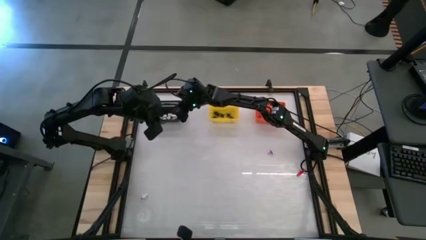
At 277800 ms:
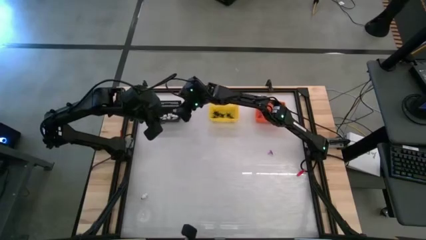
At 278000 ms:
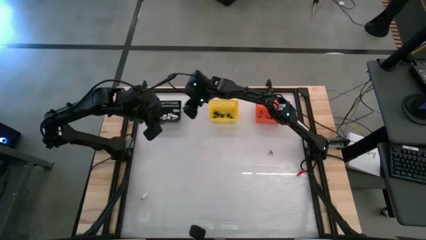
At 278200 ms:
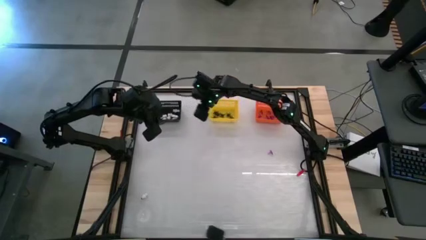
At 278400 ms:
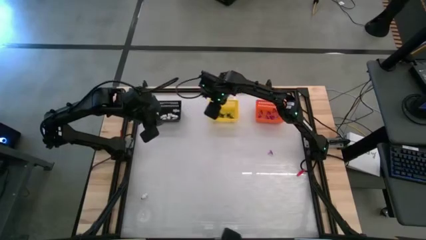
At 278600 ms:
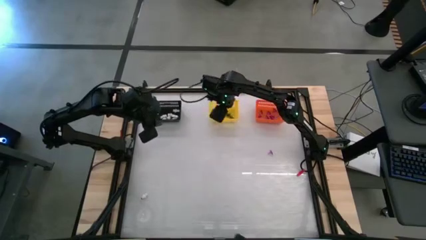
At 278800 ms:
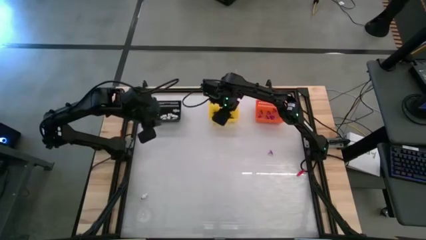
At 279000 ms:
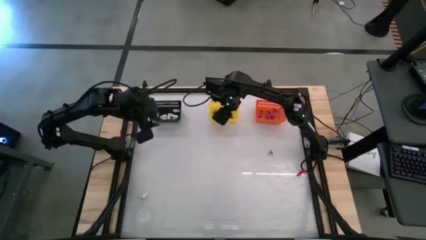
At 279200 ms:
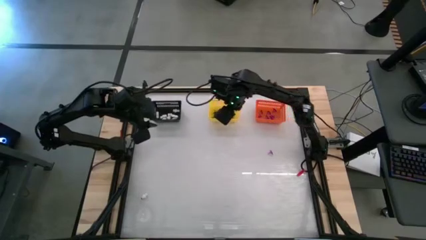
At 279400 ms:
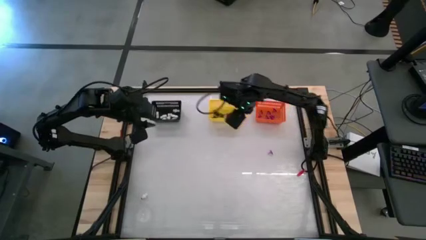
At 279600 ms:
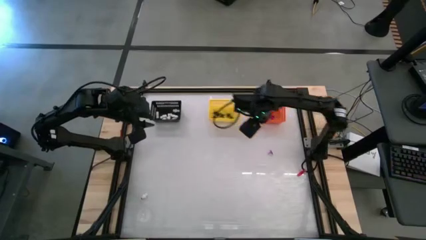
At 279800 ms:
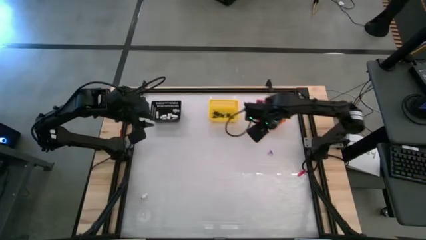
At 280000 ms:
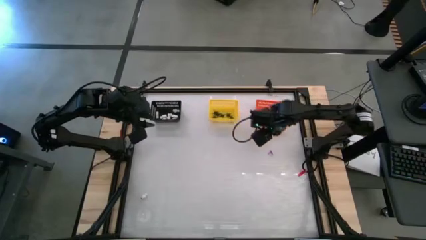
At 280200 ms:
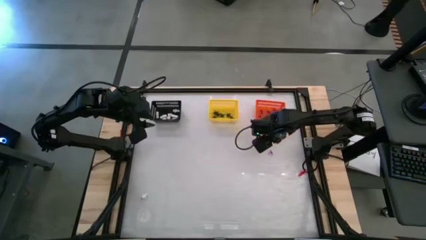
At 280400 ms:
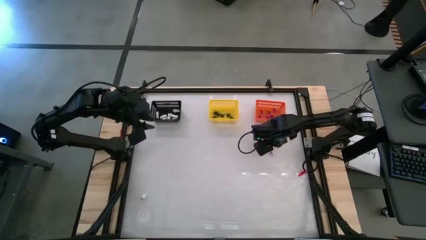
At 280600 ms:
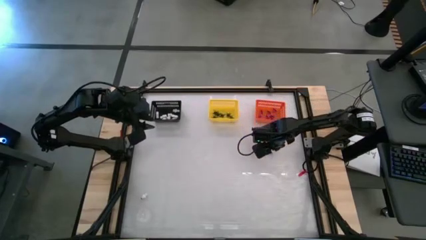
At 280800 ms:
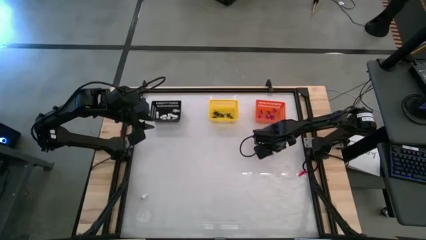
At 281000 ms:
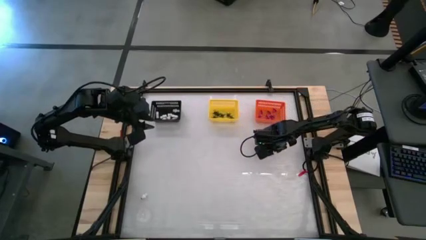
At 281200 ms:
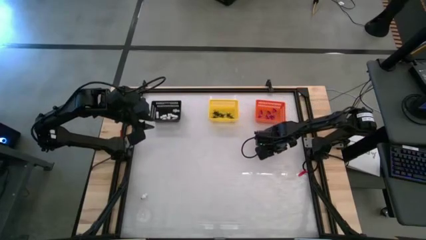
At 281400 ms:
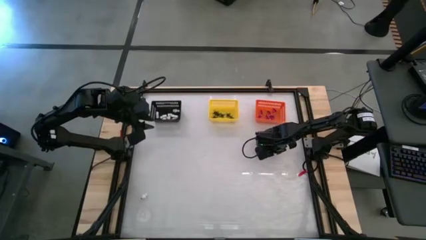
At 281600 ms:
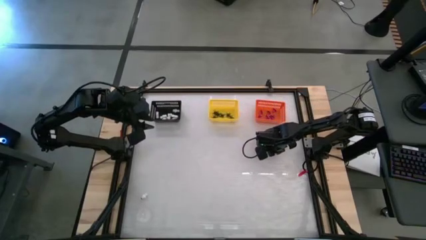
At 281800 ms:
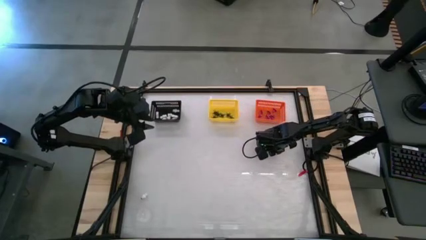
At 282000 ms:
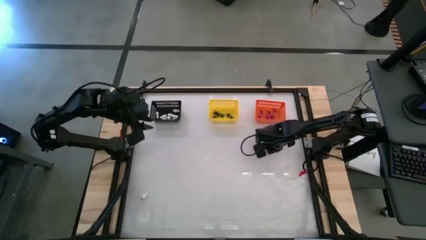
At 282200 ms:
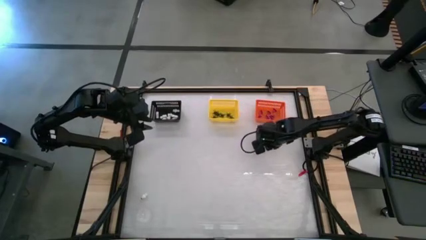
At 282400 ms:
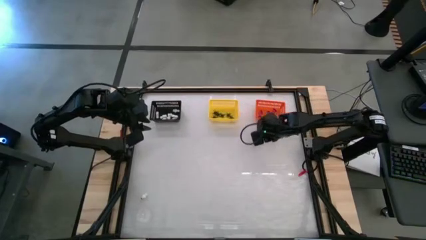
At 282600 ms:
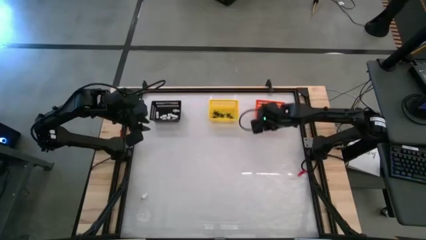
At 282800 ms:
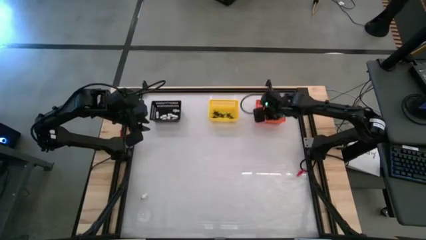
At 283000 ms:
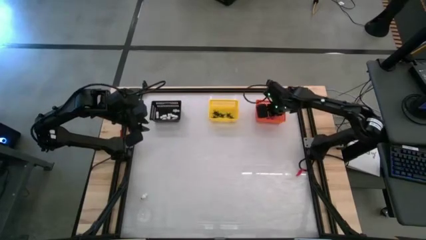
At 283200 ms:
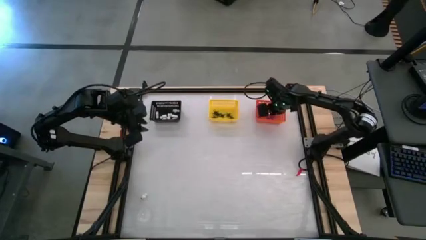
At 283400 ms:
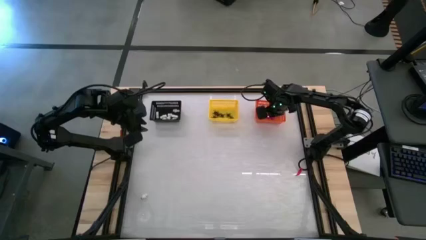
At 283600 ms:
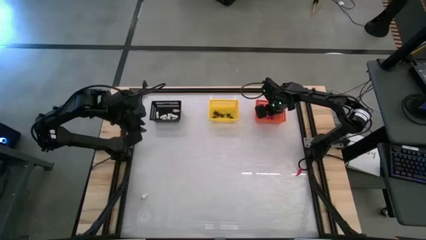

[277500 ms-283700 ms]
Task: Sort Halloween decoration
Put the purple witch hat toy into the orange basket

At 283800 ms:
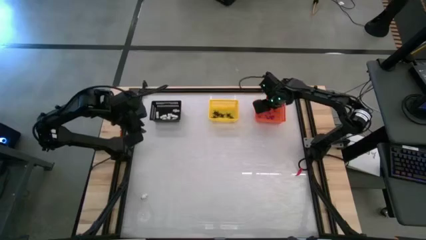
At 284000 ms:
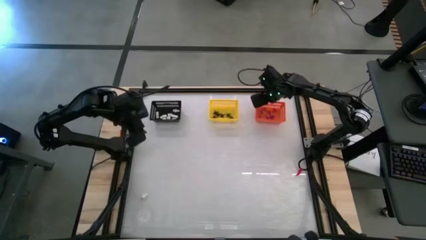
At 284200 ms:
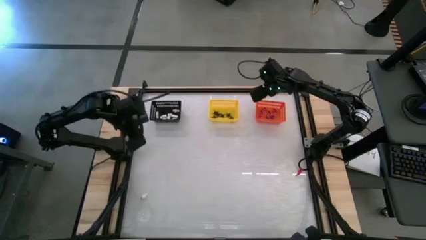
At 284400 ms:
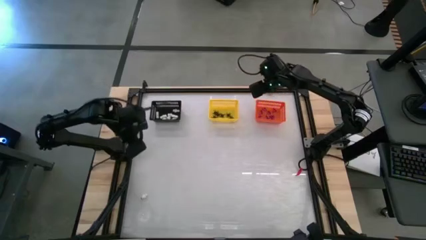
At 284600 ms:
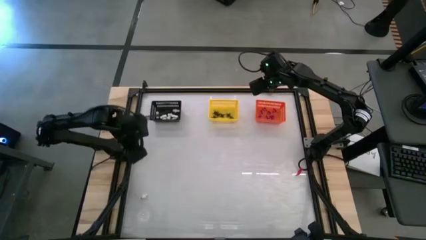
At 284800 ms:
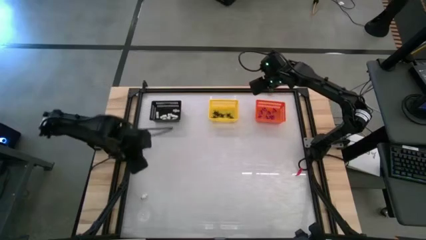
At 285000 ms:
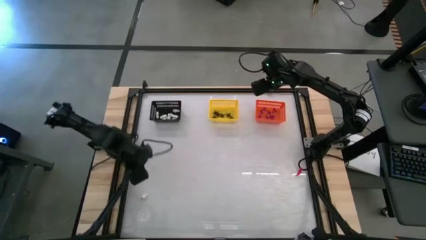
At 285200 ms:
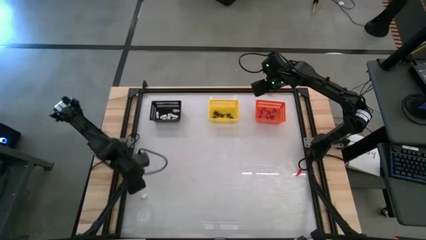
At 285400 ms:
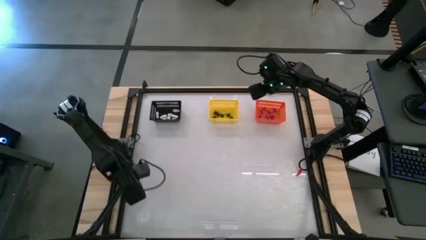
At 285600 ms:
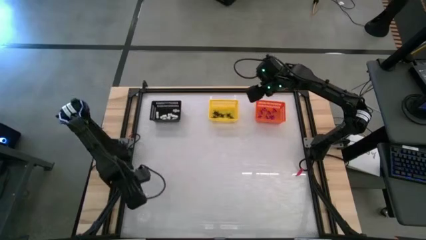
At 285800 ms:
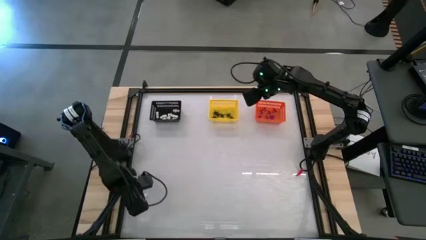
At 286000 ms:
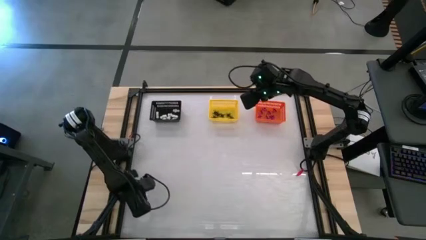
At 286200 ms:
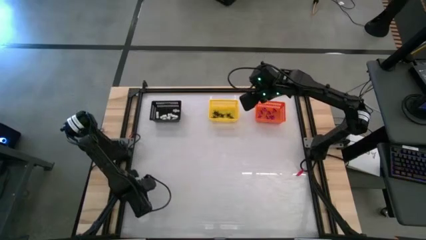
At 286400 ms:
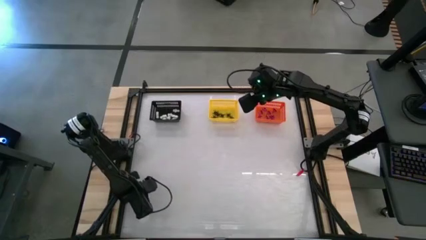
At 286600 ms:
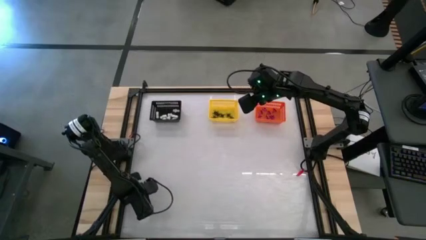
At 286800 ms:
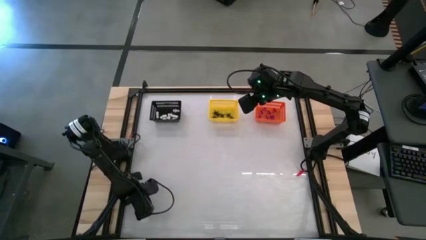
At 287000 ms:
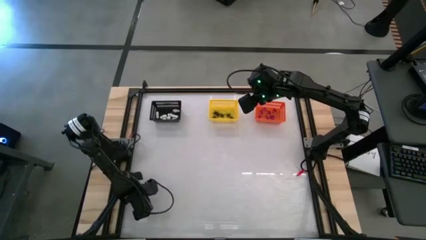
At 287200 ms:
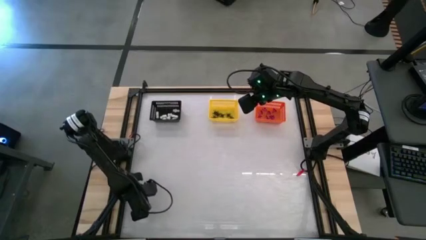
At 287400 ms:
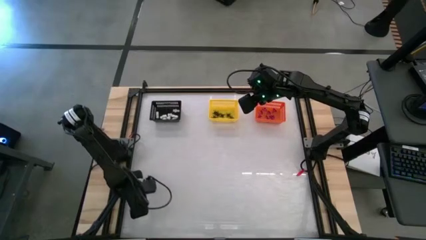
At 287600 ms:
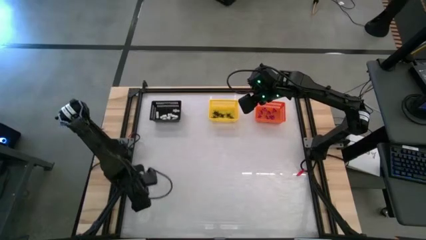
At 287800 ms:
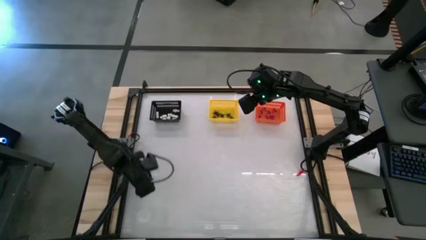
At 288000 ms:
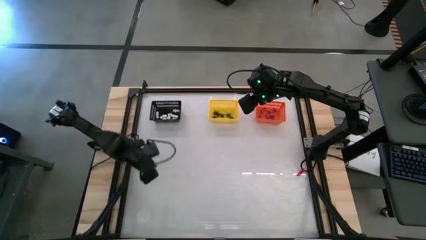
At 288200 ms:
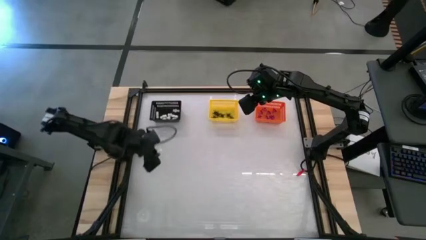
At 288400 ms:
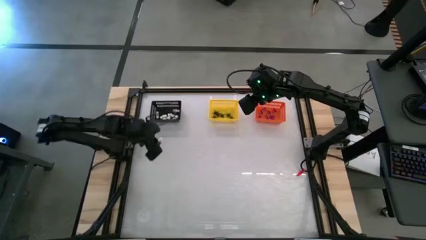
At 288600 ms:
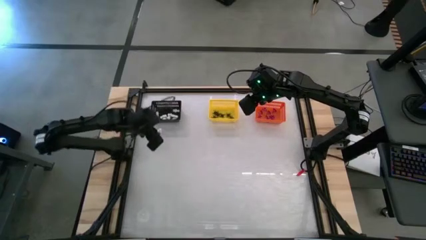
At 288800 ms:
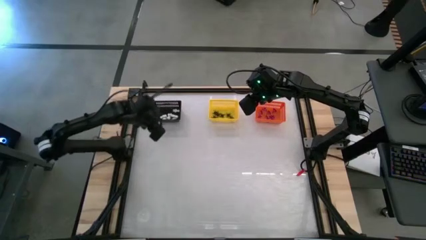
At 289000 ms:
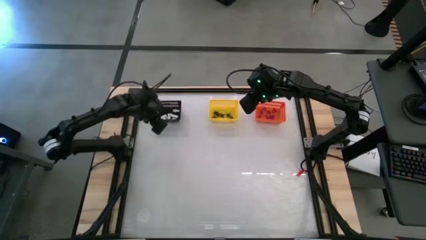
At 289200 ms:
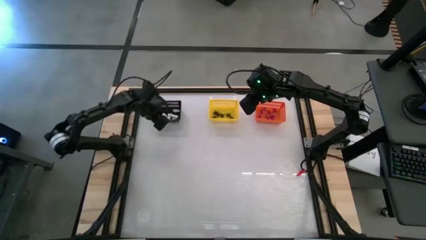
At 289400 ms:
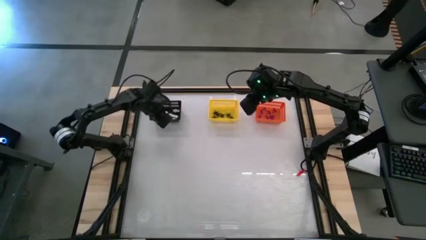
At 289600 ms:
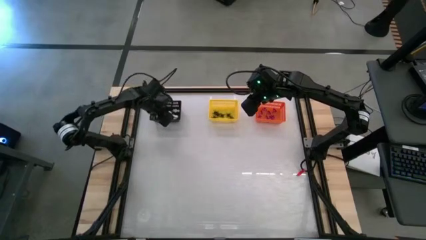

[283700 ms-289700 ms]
Put the white skeleton toy into the black basket
